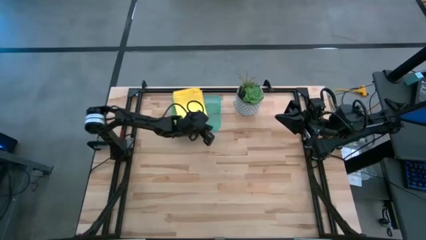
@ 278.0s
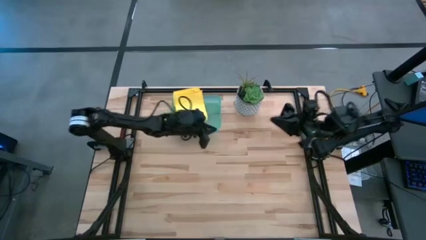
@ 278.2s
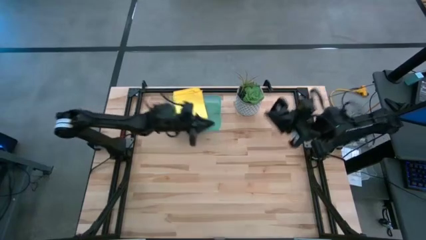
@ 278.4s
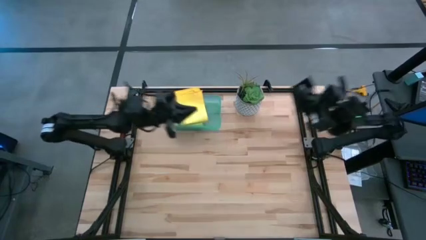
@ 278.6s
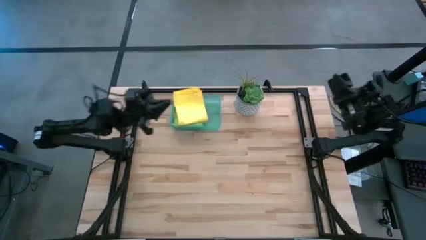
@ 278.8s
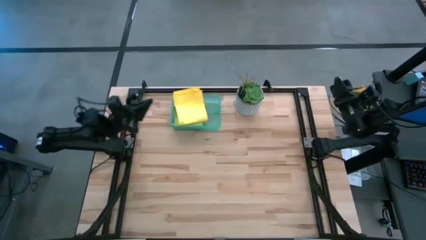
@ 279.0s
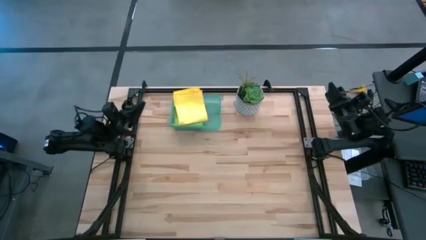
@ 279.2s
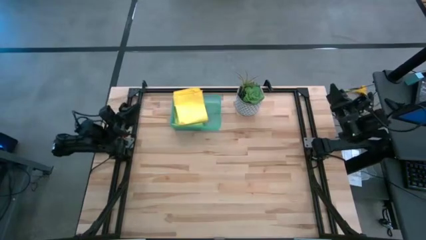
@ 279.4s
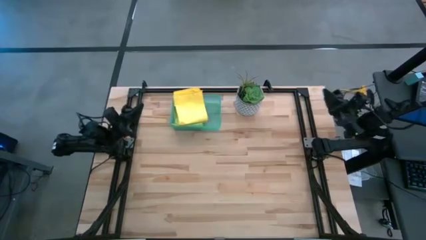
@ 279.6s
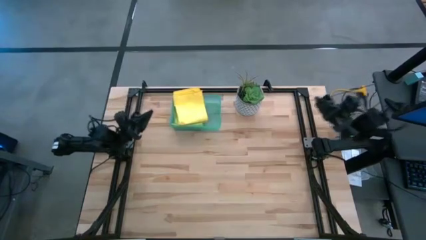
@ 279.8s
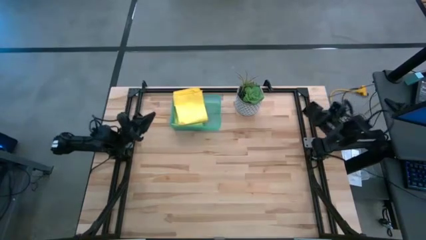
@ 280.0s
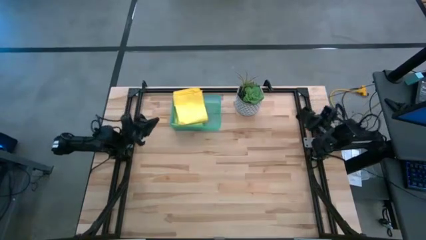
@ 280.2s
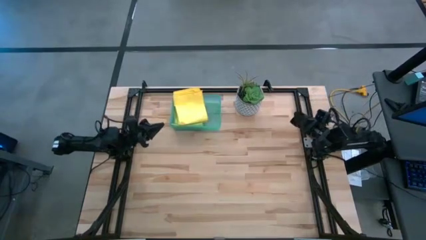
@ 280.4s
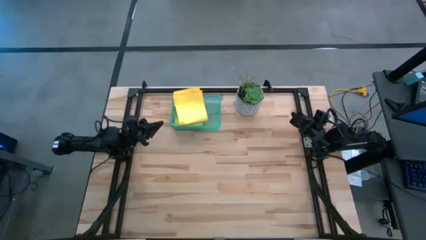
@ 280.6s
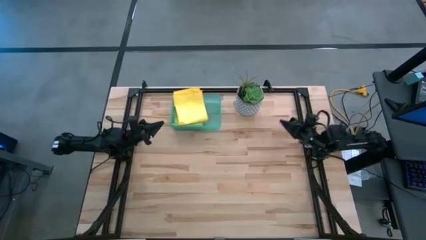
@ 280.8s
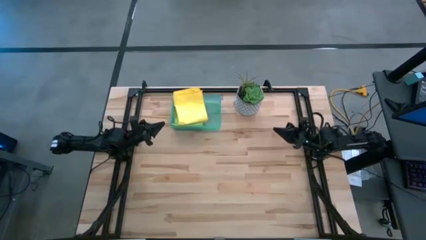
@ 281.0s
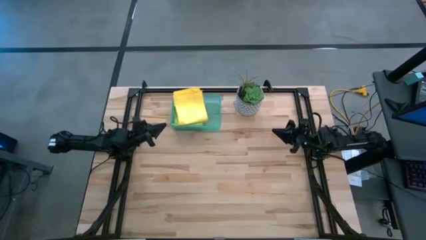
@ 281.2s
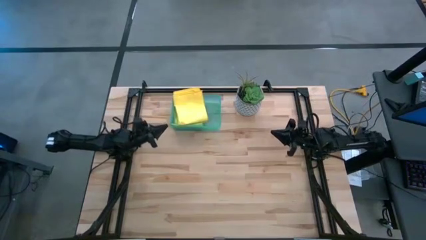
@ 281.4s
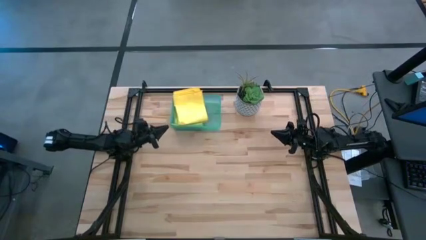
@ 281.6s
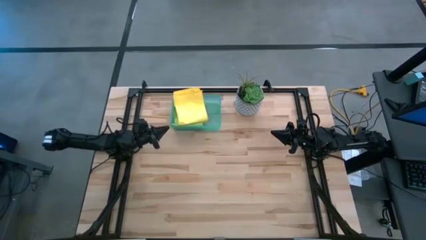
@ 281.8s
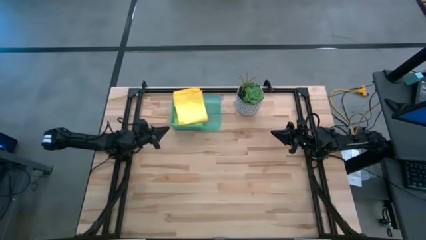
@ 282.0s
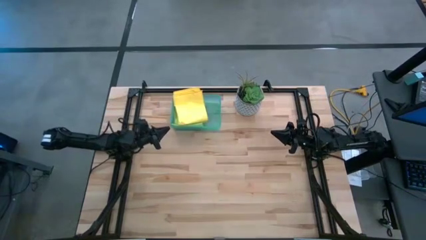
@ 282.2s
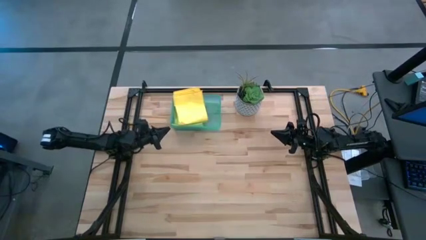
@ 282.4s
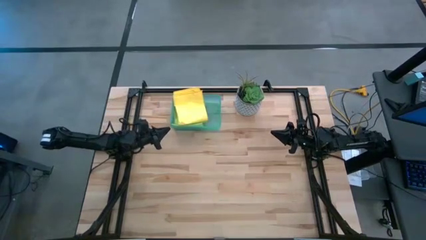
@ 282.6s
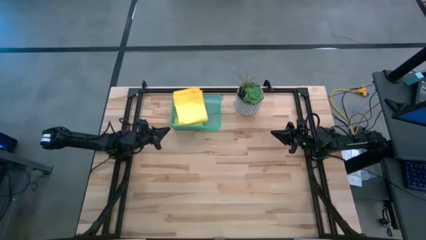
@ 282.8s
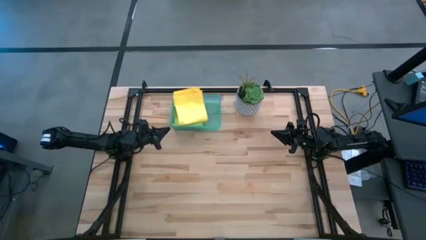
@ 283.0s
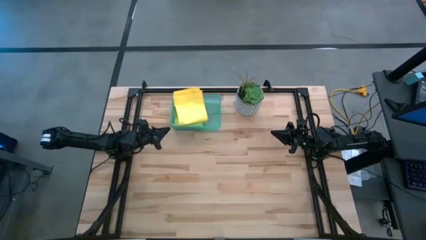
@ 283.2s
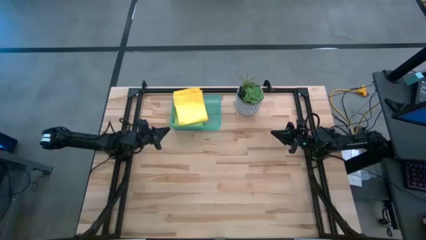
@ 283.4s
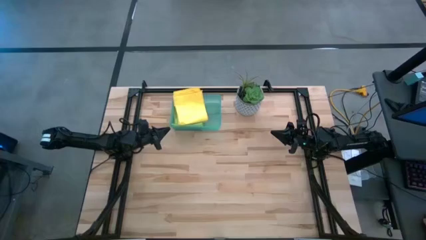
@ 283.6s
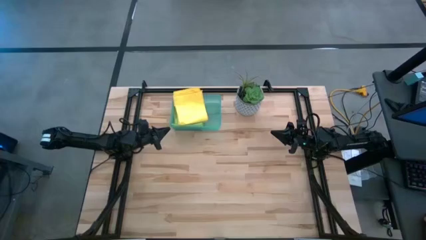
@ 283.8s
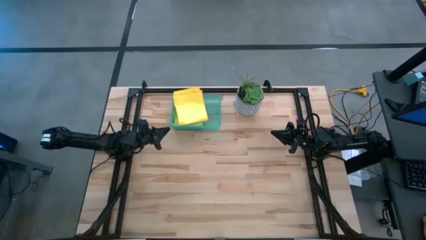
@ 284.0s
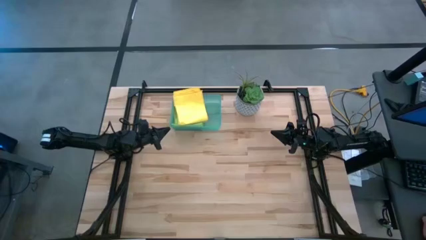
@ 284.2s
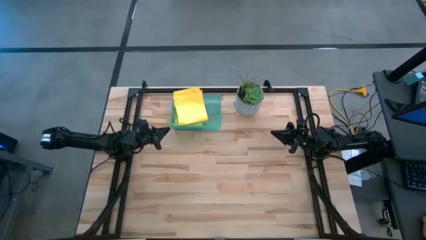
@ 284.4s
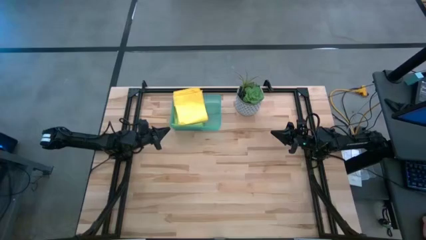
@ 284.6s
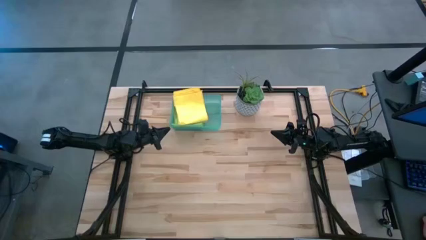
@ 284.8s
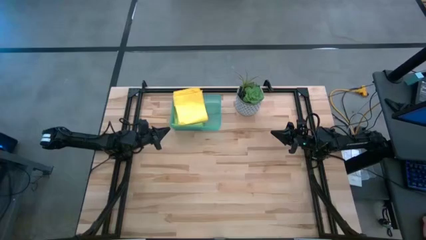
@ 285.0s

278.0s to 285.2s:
Task: Fold microfiber towels
Return to Home Position

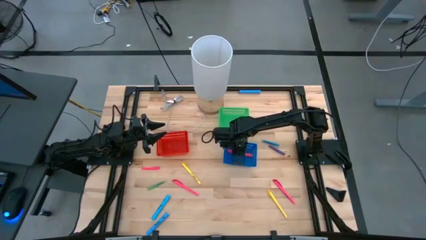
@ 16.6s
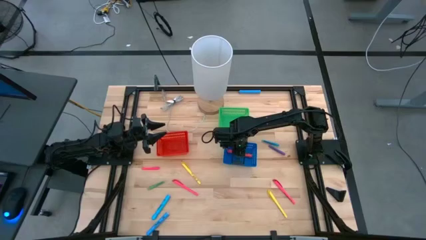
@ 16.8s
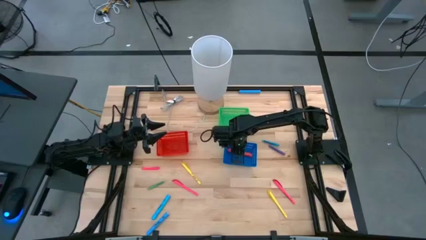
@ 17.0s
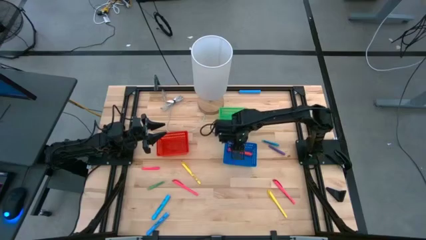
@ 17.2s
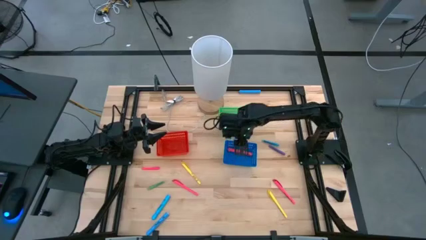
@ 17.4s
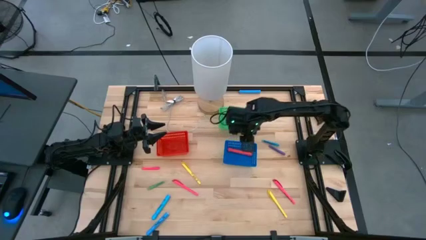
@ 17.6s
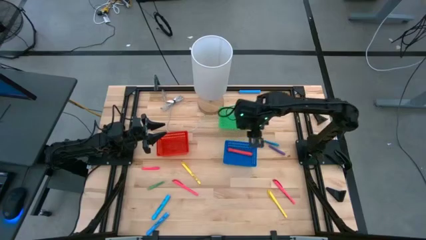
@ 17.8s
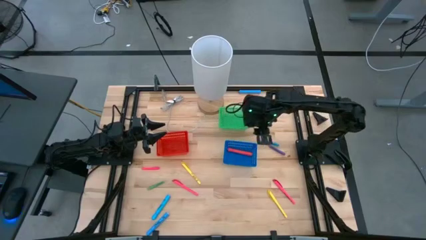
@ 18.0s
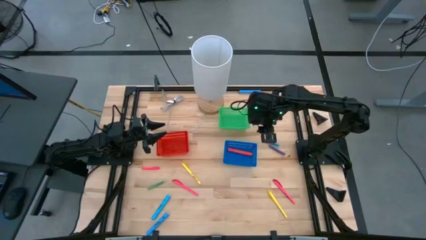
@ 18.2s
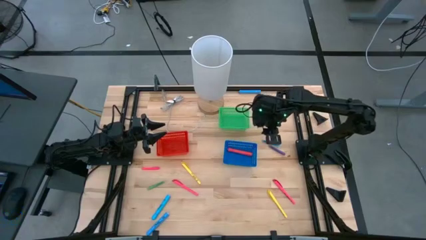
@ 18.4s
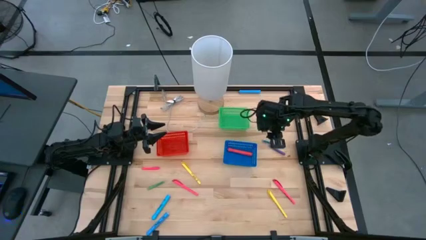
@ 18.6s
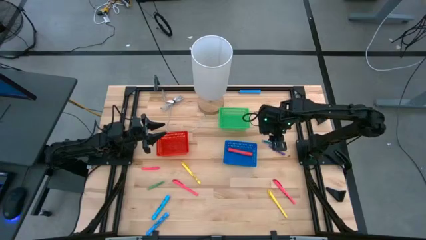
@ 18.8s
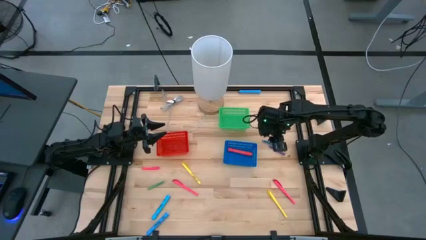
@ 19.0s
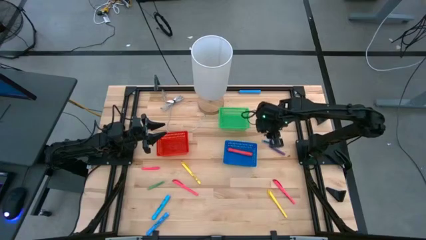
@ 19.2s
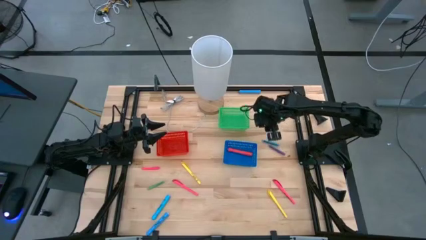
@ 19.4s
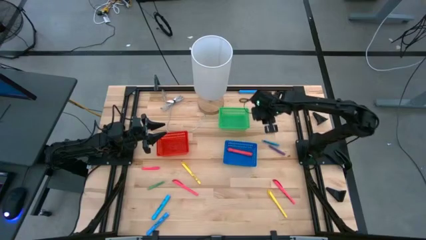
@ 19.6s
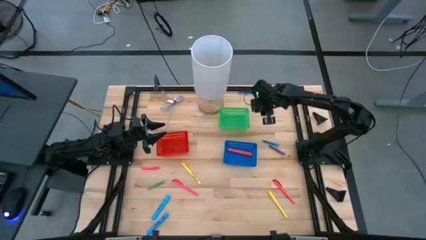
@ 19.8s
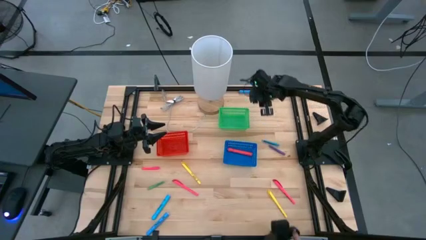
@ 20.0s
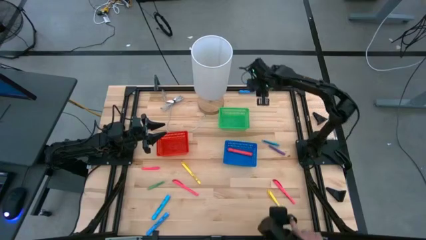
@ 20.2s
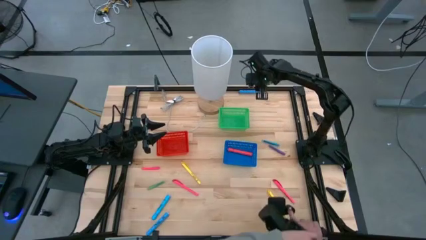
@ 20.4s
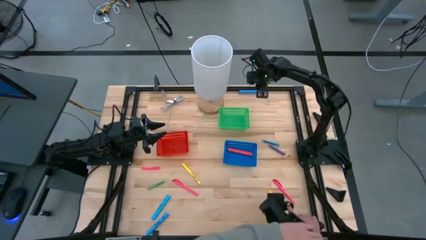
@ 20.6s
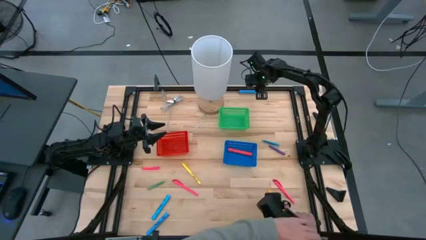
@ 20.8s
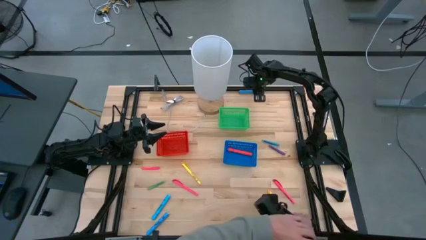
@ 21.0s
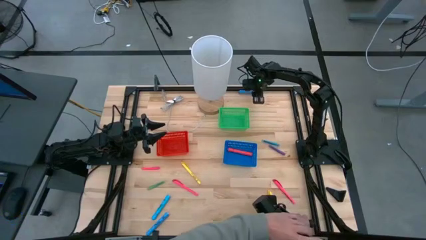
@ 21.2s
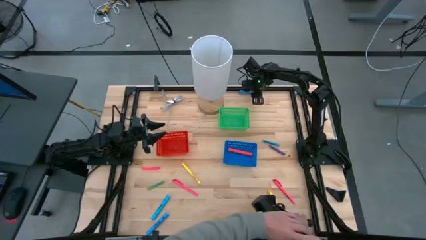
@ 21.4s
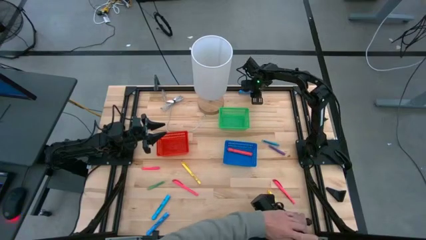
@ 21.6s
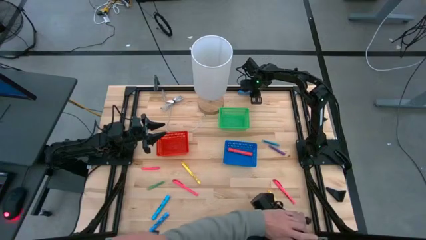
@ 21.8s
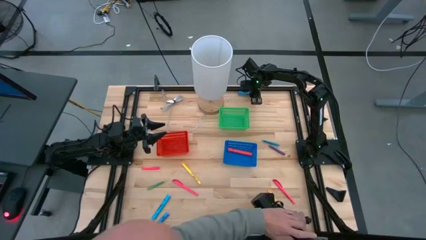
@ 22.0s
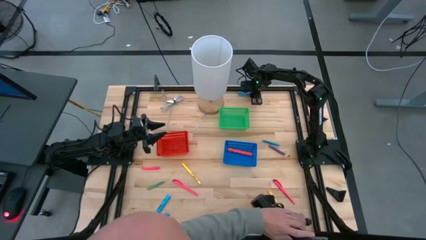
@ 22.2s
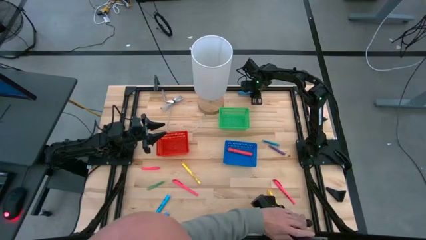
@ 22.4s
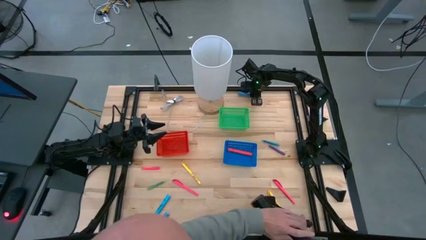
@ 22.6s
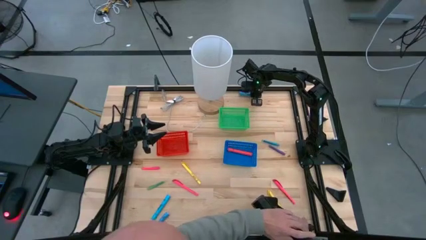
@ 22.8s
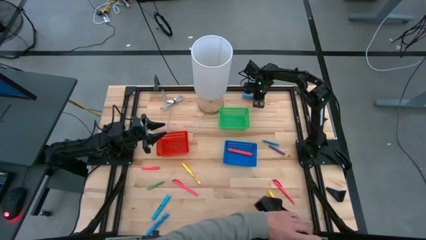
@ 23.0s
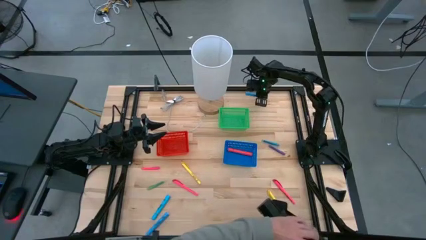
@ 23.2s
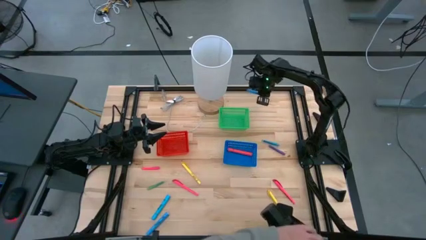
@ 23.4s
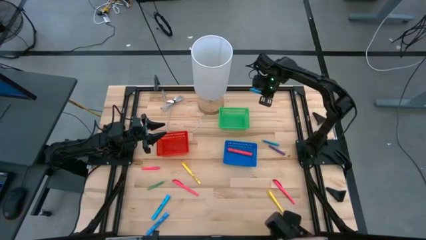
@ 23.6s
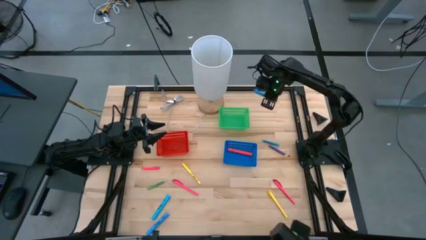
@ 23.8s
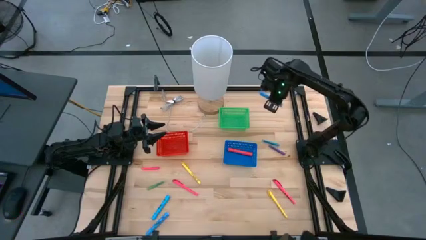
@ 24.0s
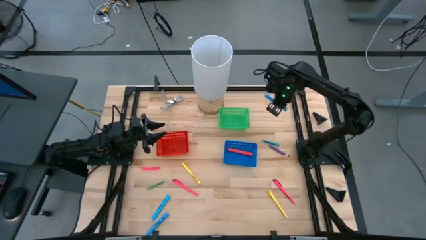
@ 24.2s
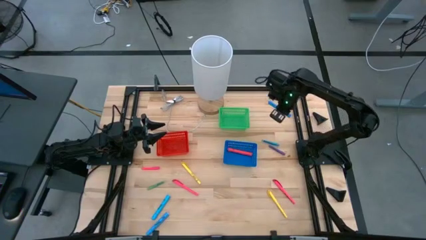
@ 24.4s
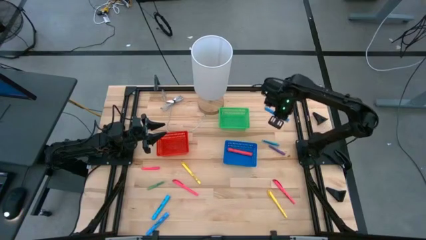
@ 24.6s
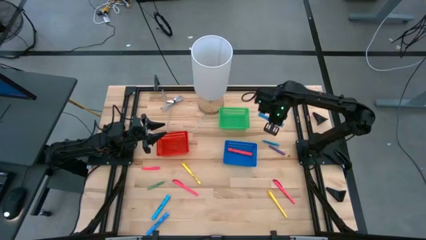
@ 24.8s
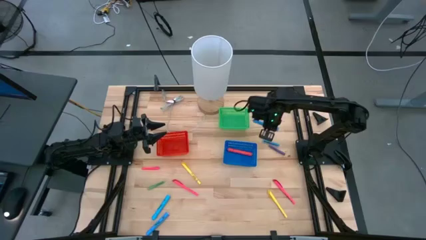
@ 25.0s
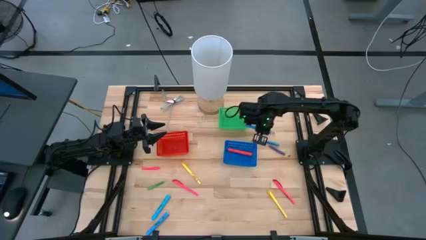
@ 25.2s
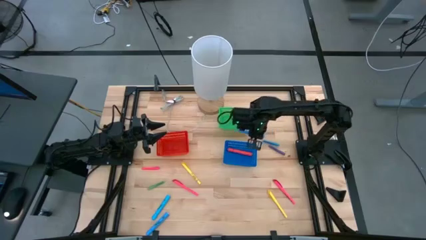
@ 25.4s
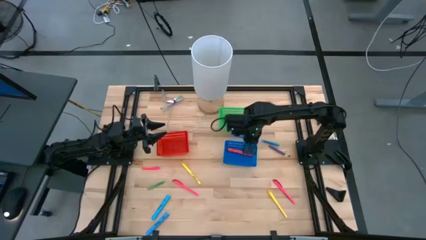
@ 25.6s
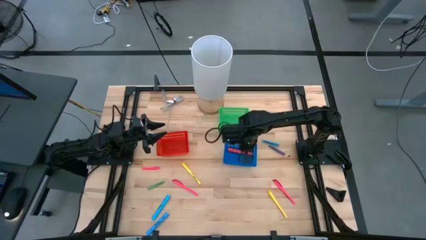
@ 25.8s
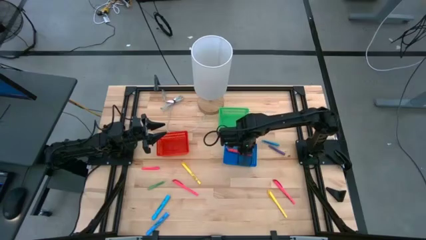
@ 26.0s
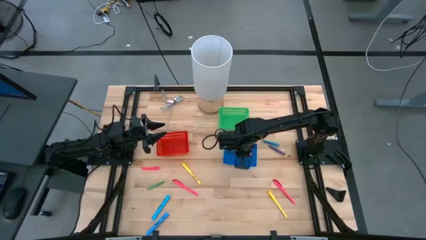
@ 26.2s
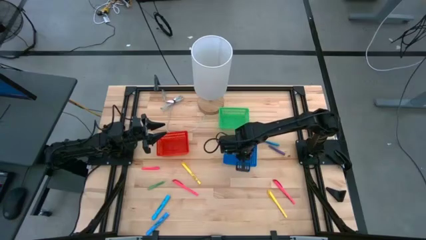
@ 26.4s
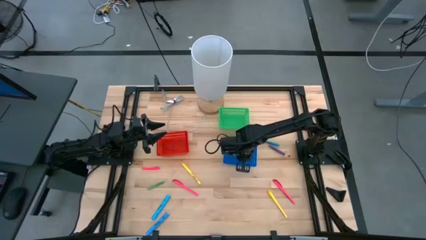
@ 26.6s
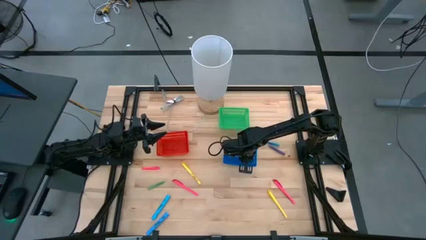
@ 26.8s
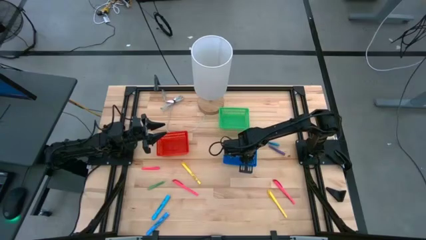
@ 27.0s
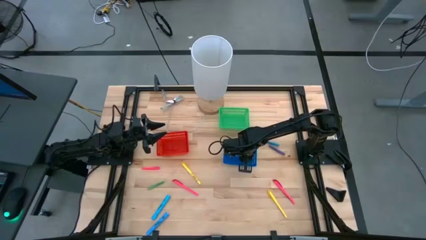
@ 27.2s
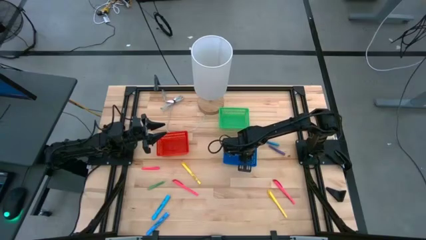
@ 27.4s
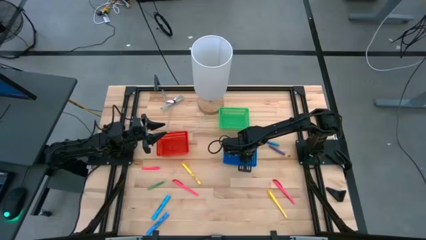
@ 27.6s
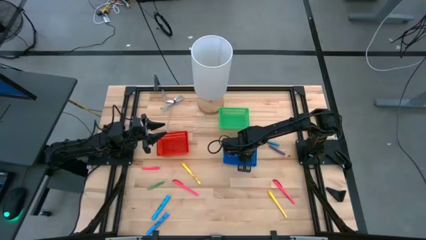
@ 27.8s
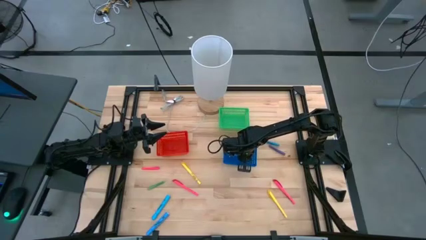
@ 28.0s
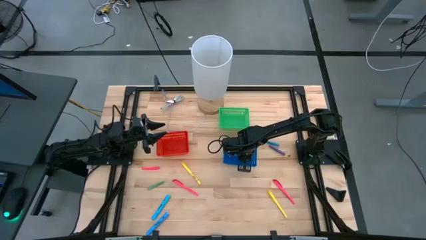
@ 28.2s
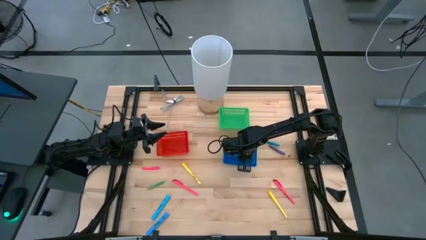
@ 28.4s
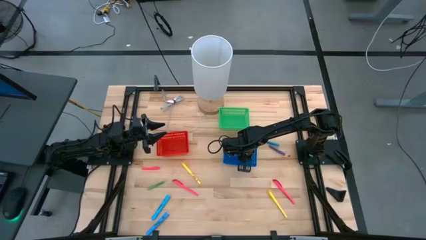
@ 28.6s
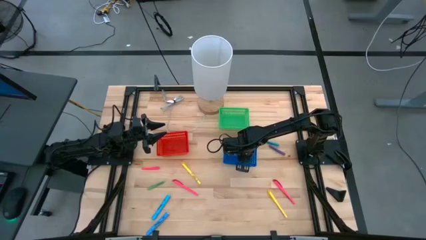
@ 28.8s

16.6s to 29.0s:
Task: Pick & Place Markers
Put the top blue highlighter into the blue bin
